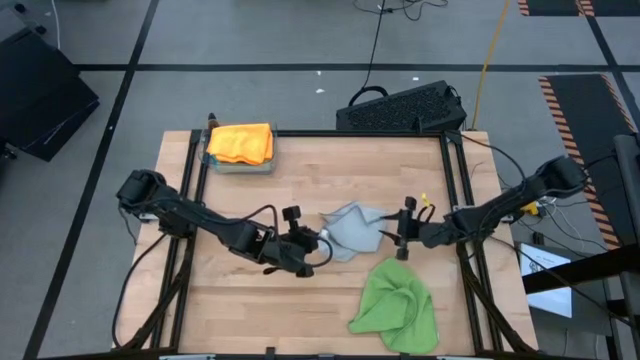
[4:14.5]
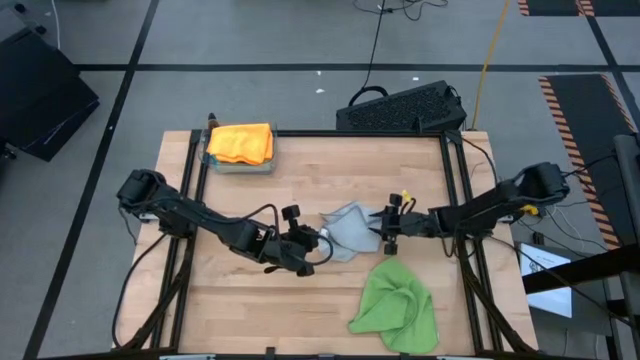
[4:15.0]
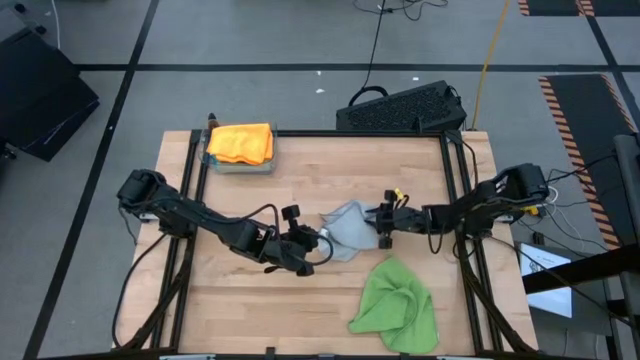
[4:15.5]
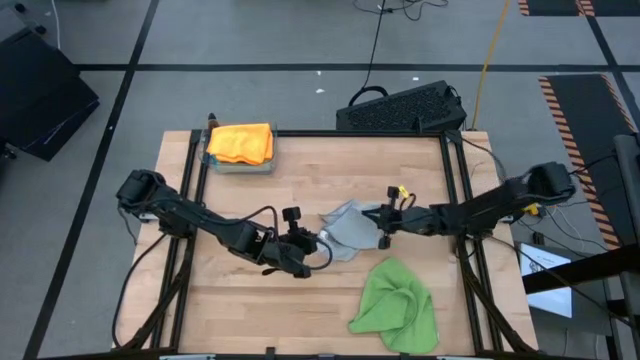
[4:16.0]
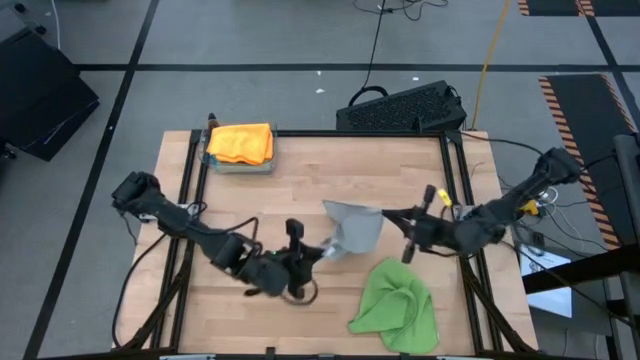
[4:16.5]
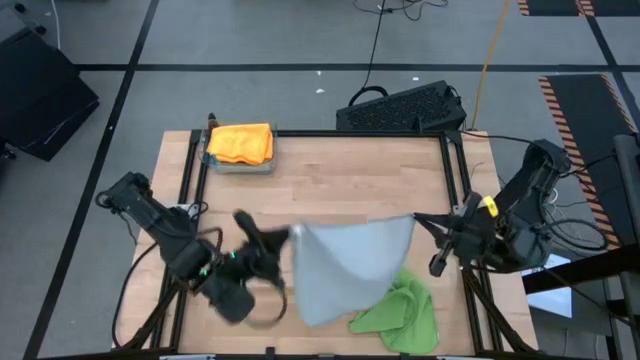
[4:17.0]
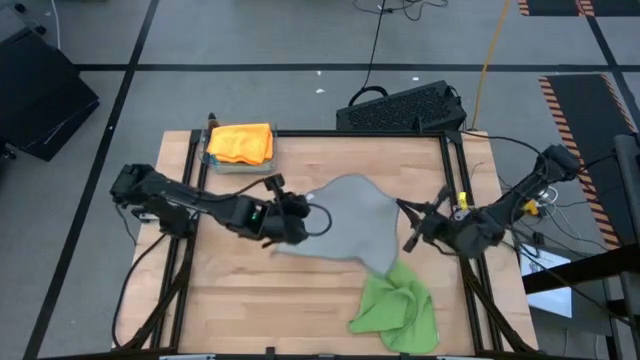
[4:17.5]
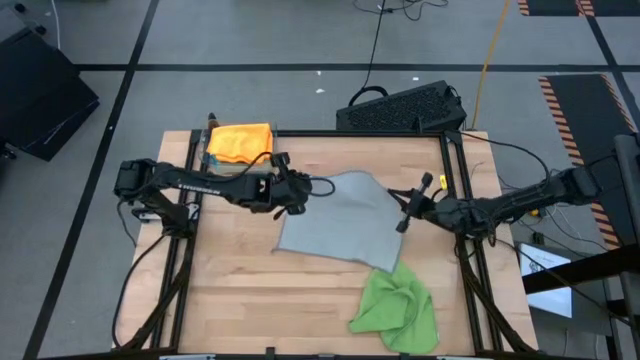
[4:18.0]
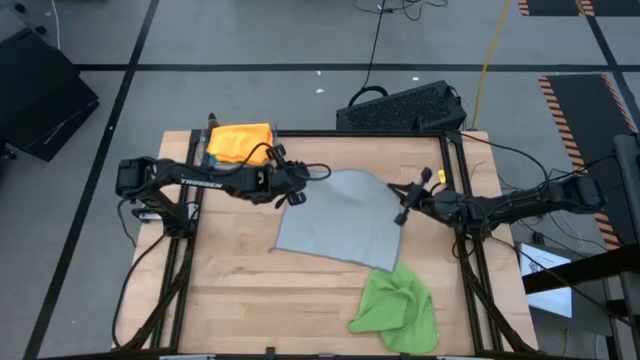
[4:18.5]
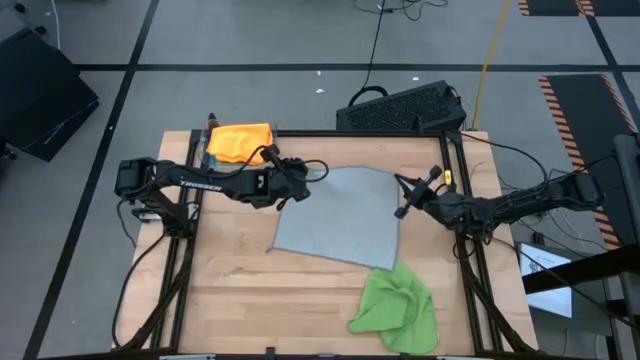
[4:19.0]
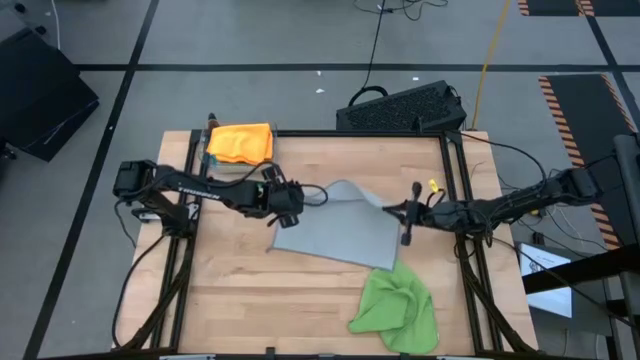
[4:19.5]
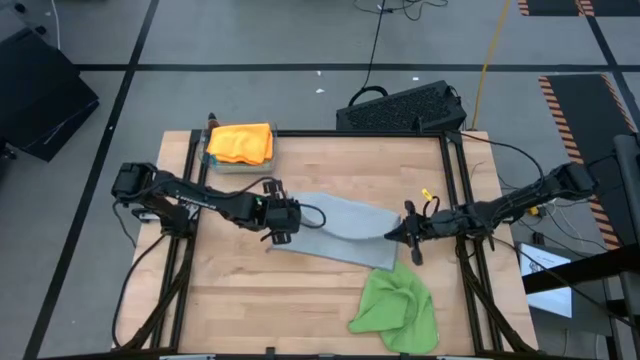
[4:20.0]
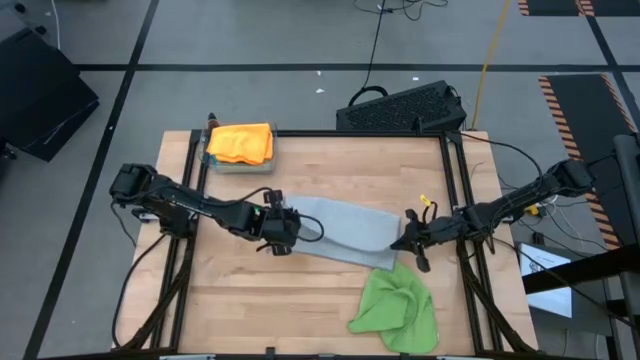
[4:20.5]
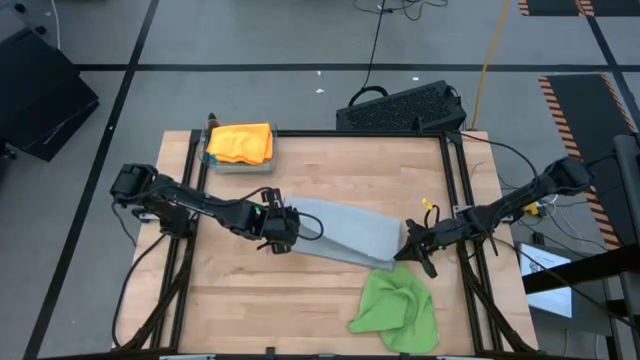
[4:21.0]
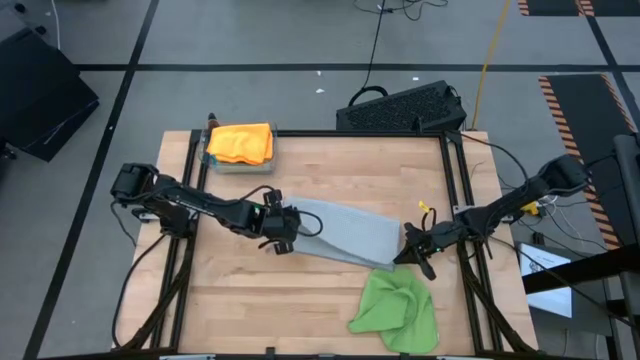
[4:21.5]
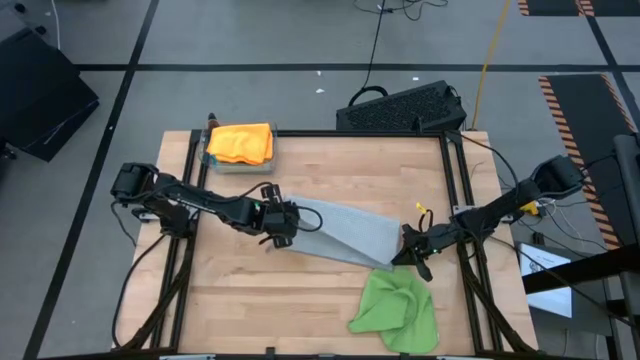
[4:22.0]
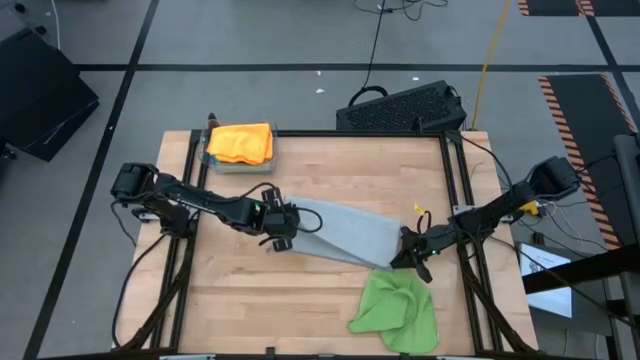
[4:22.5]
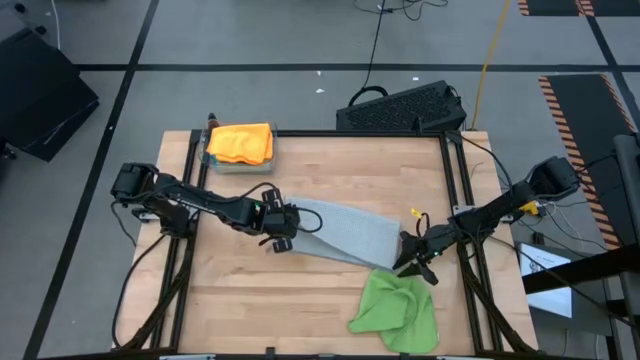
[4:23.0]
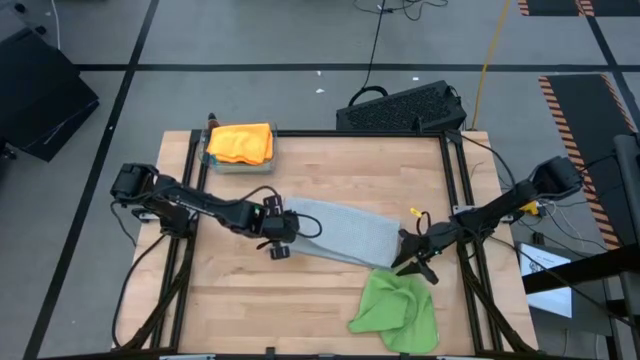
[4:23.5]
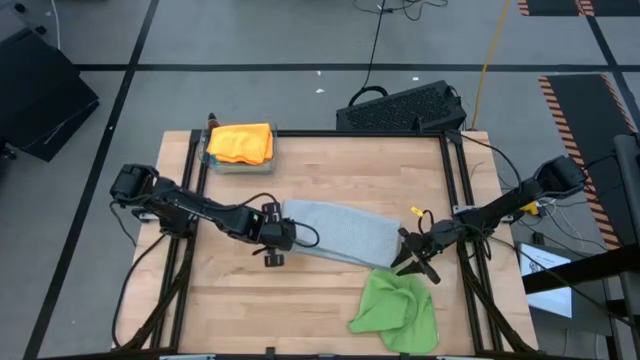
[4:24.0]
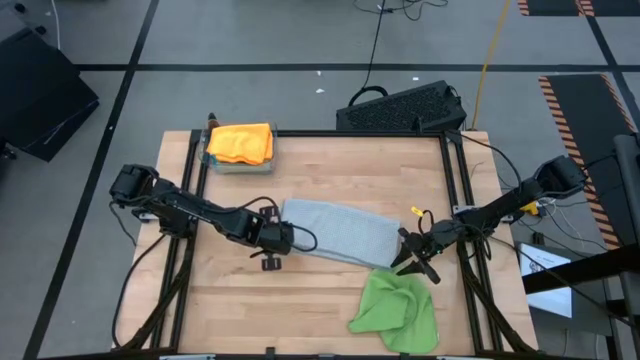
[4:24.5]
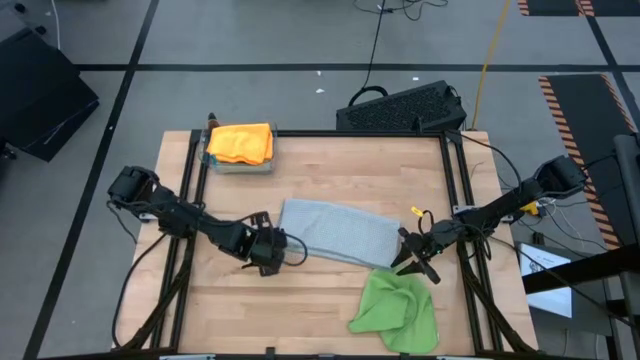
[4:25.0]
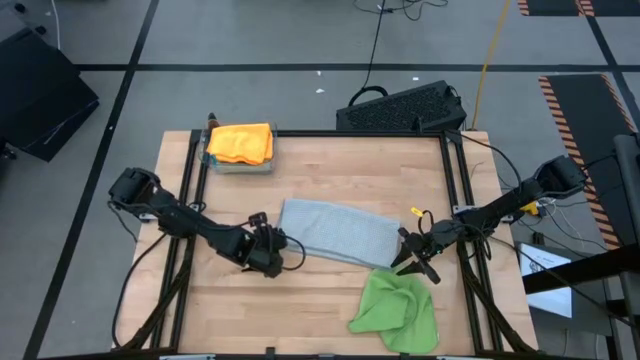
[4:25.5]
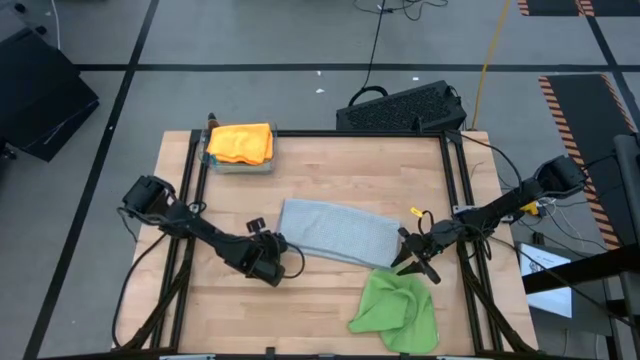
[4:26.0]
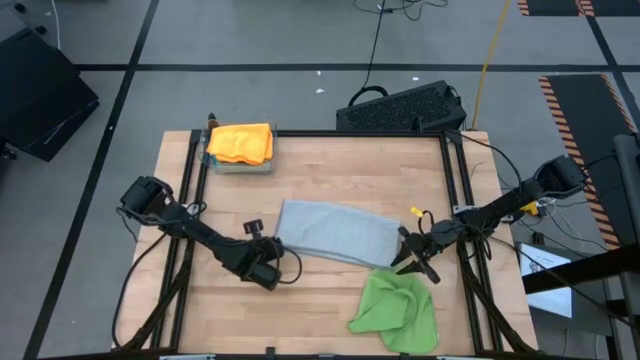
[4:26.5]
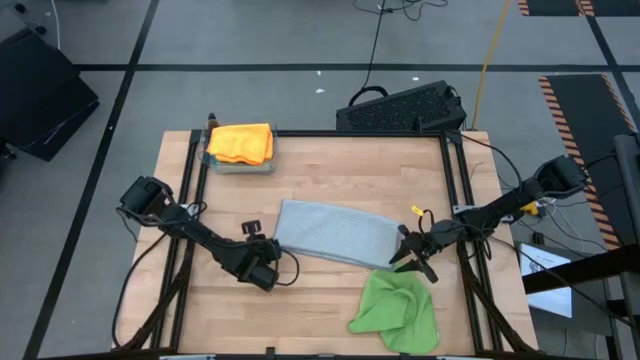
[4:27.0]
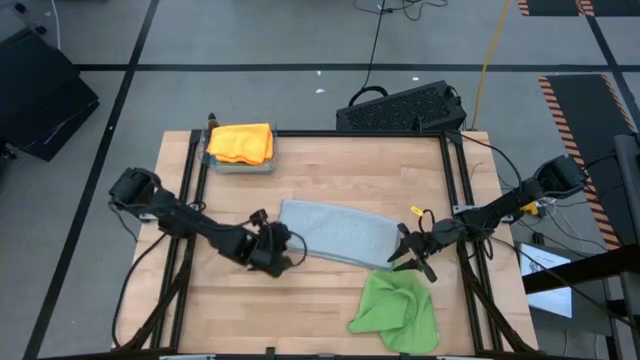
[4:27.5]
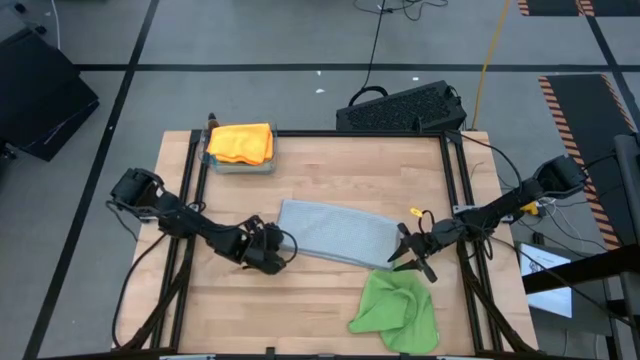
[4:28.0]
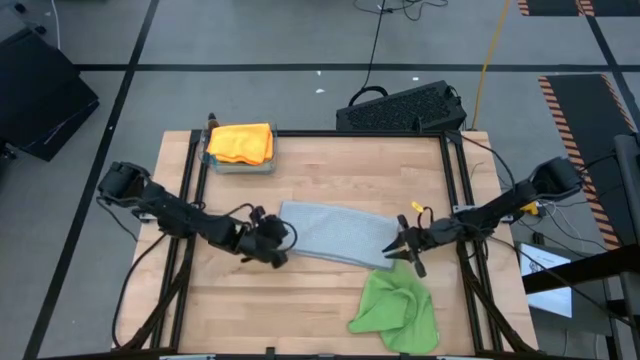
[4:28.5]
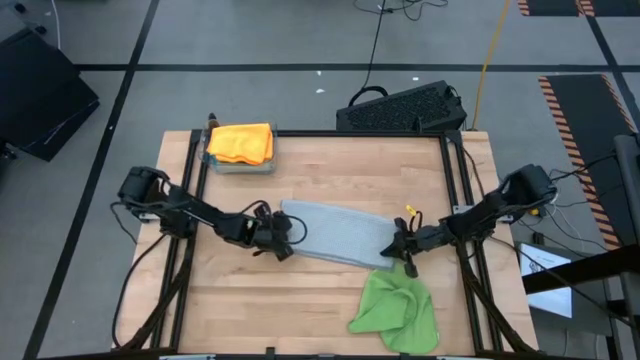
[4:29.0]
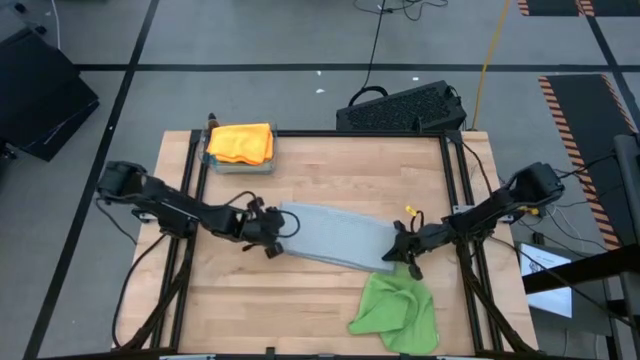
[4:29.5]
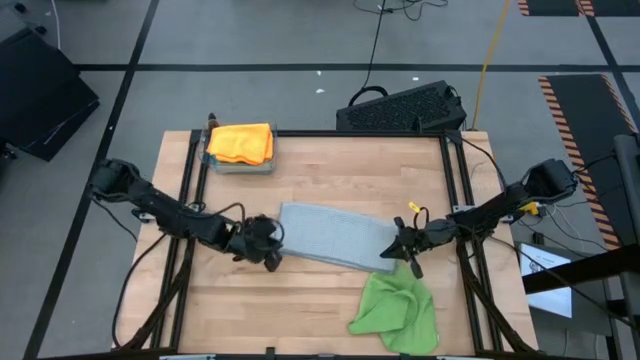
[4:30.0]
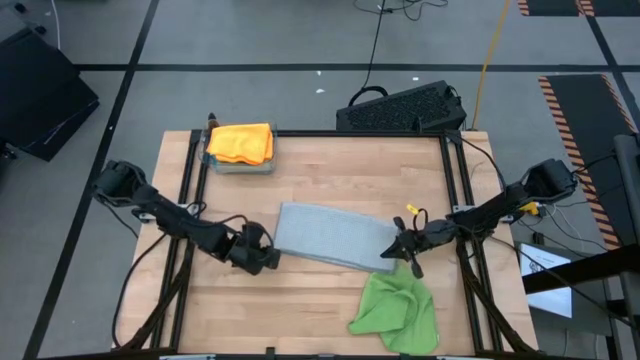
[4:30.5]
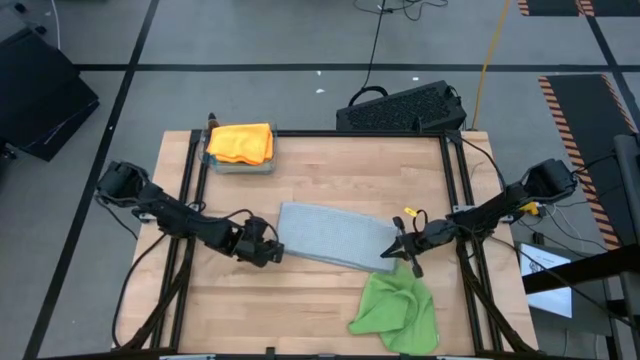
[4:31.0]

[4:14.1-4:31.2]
Task: Fold microfiber towels
Fold the gray microfiber cloth

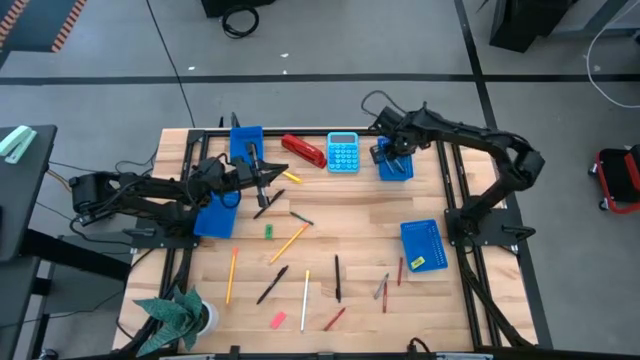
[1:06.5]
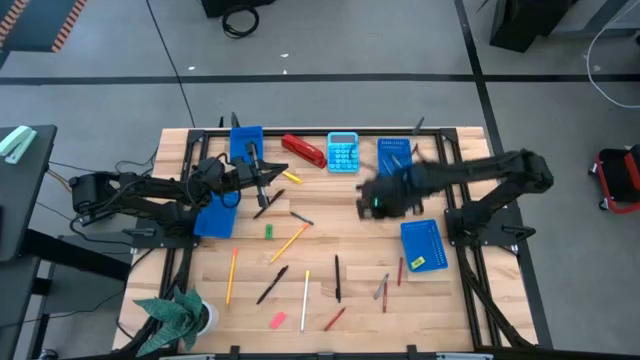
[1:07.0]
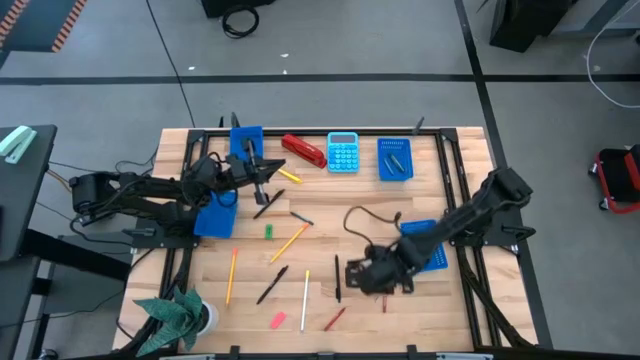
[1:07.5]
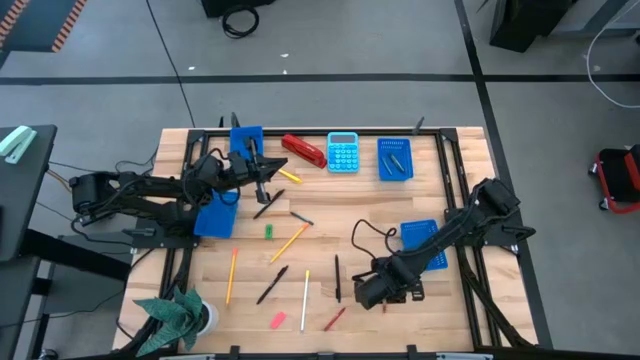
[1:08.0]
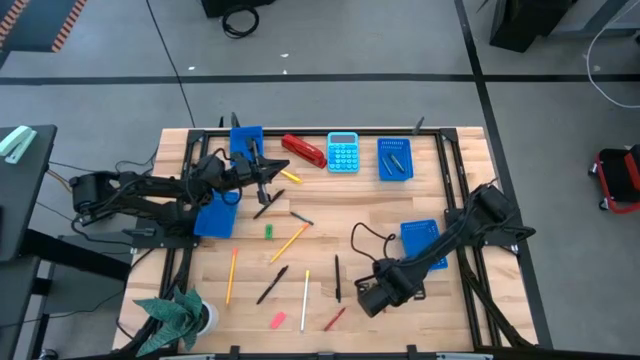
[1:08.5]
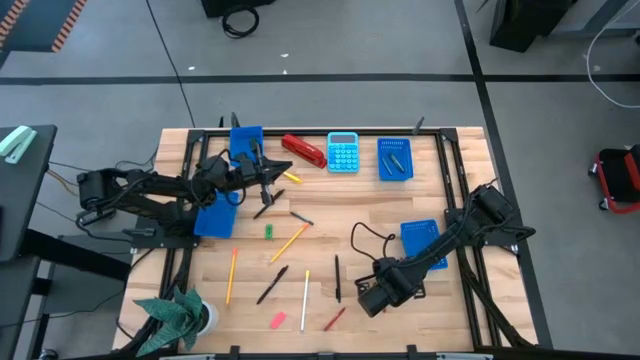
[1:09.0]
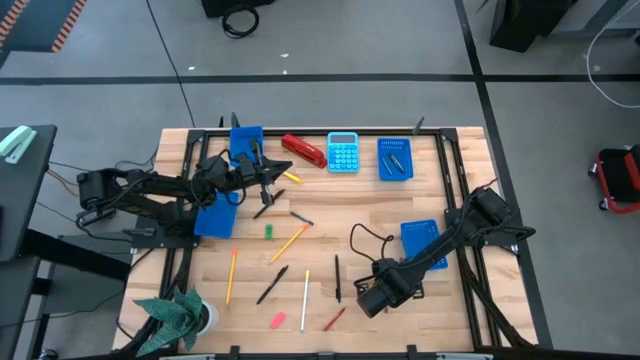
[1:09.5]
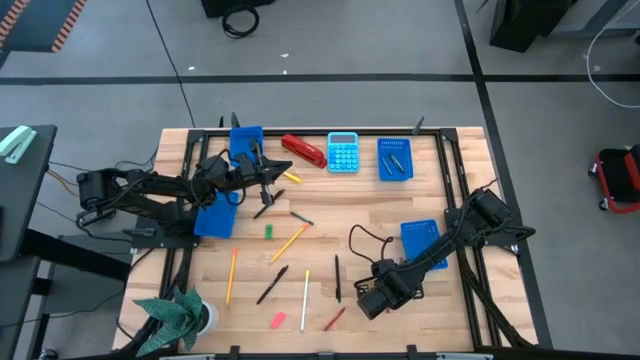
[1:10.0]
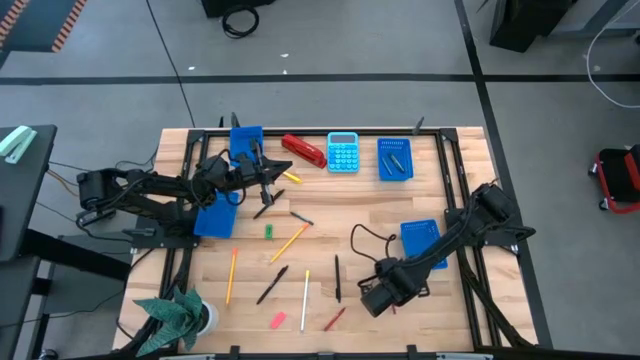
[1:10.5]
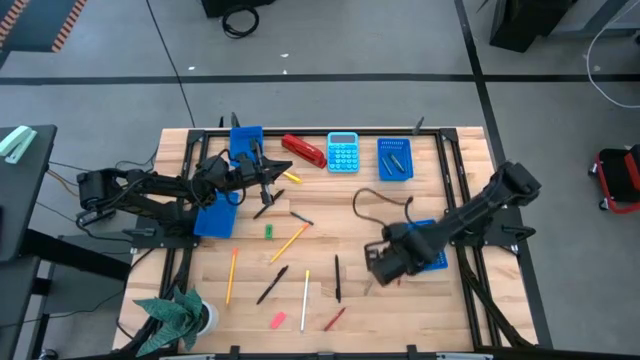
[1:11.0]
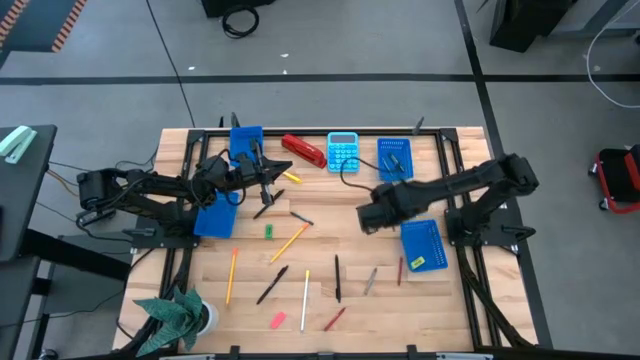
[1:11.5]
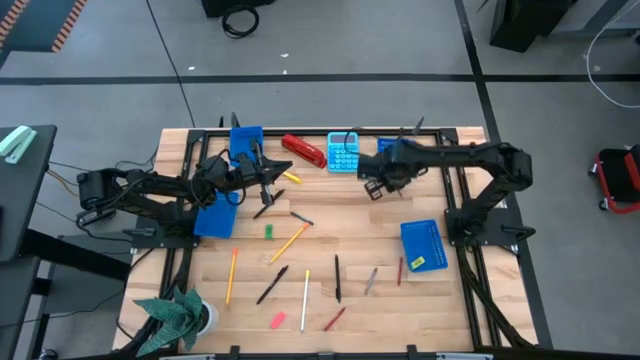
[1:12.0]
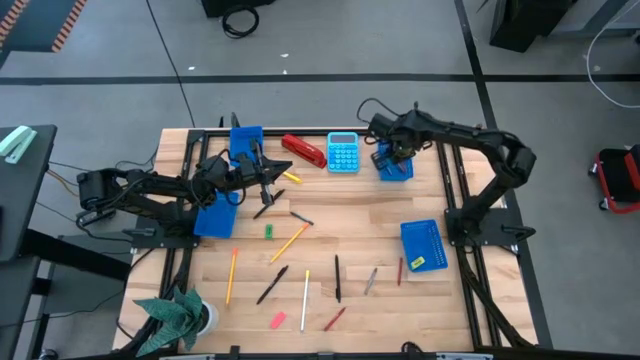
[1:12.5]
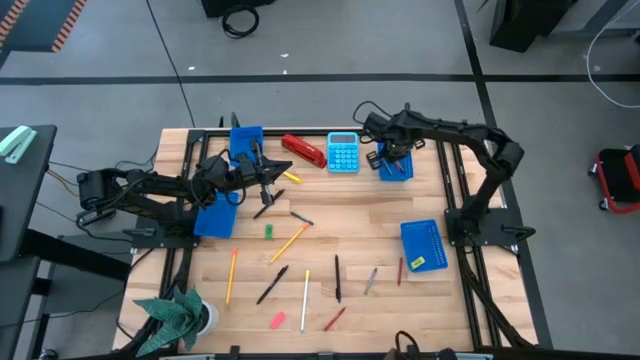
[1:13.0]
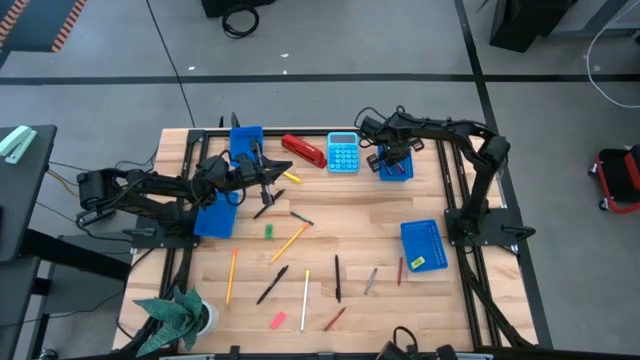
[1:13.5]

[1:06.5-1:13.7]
Task: Sort crayons/erasers/pens/pencils in bins
Put the middle red crayon into the top right bin
